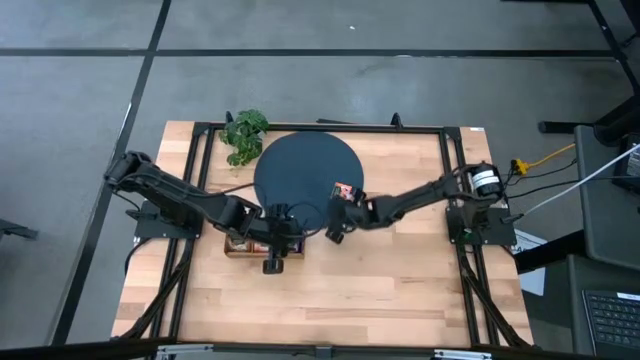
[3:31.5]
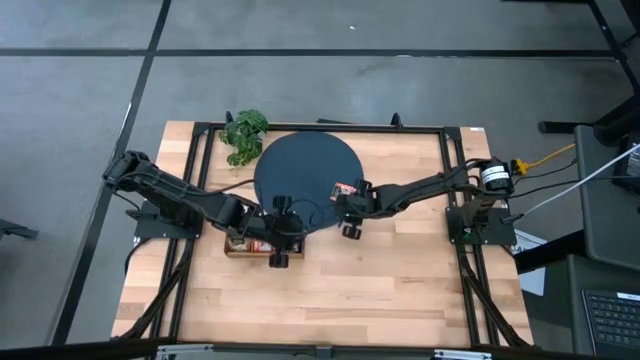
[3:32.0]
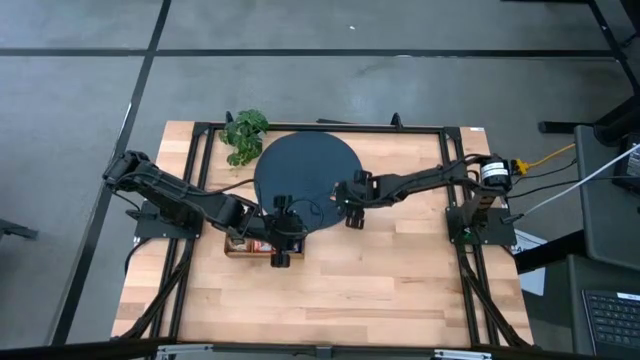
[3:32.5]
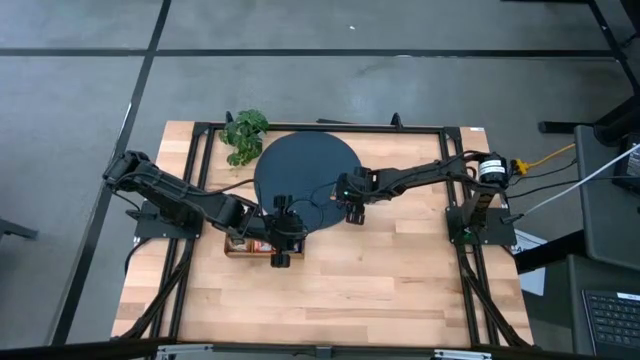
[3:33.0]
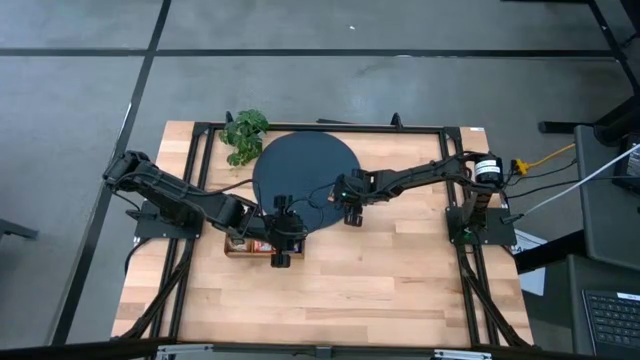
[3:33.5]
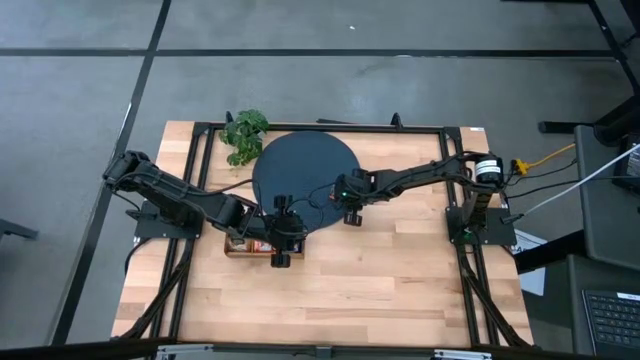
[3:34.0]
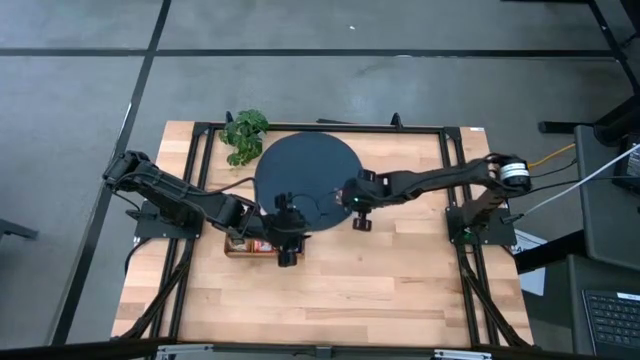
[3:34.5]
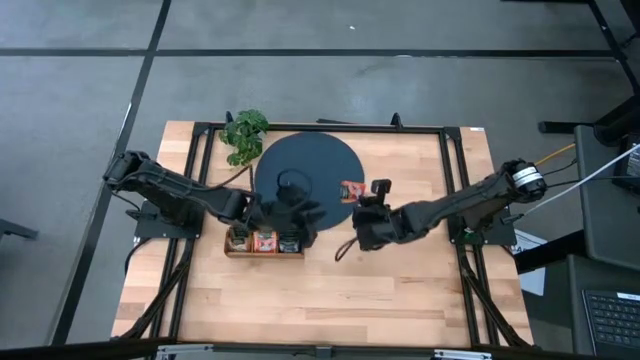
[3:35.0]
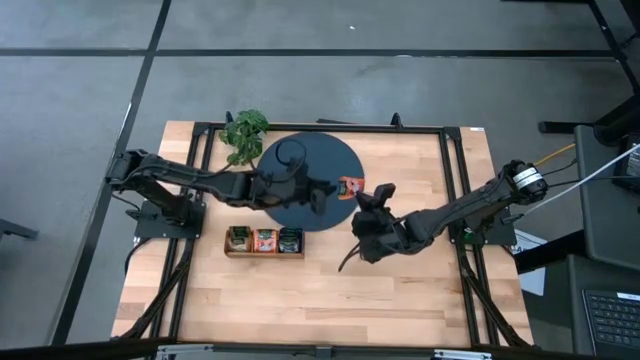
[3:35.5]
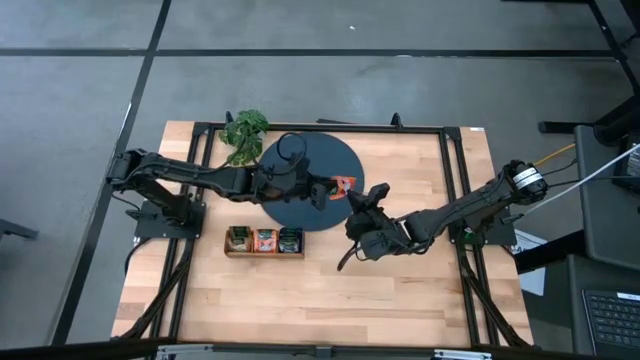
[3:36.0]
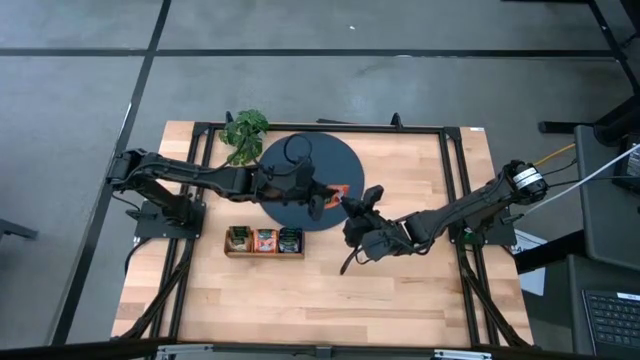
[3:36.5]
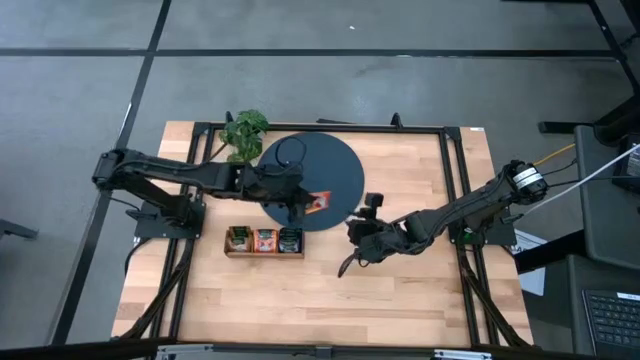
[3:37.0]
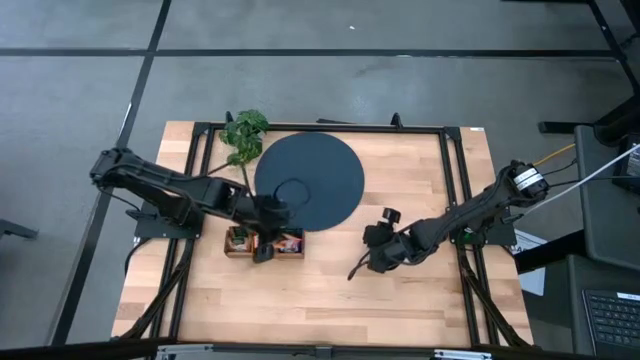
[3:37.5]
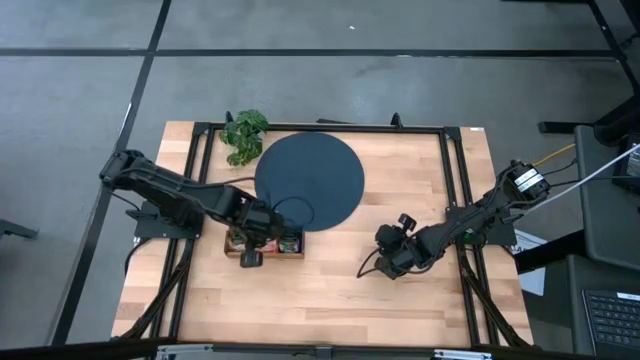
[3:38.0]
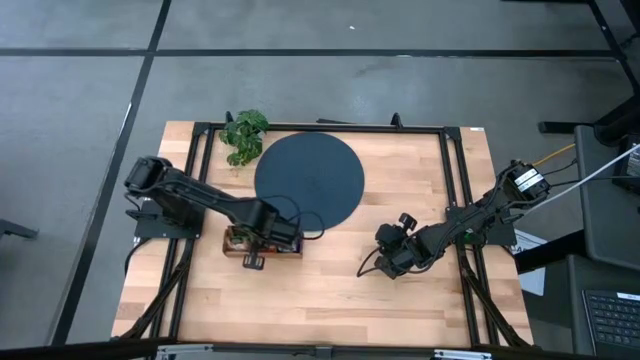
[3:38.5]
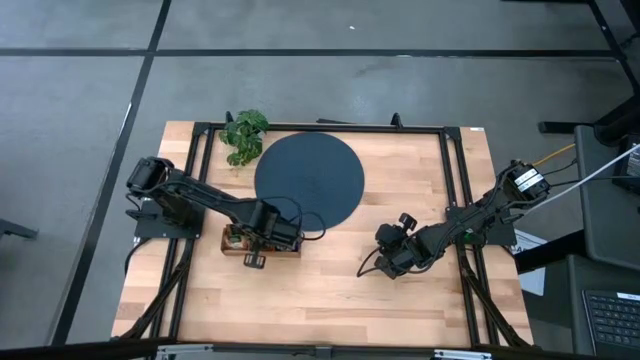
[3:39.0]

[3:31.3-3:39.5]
Task: Pick & Place Tea
Put the orange tea bag into the middle section of the wooden organizer

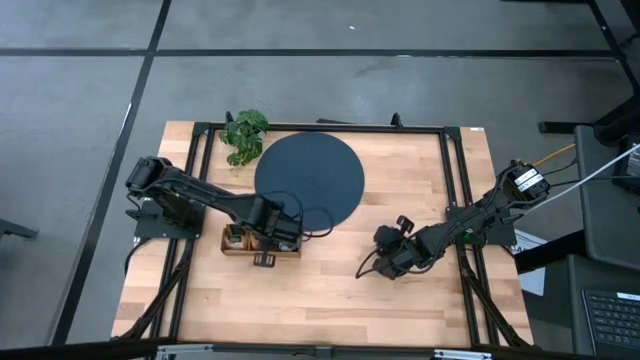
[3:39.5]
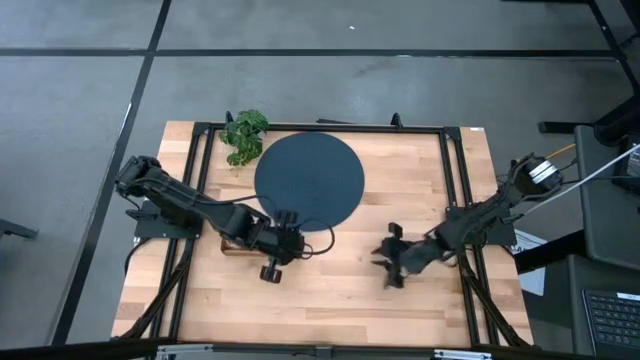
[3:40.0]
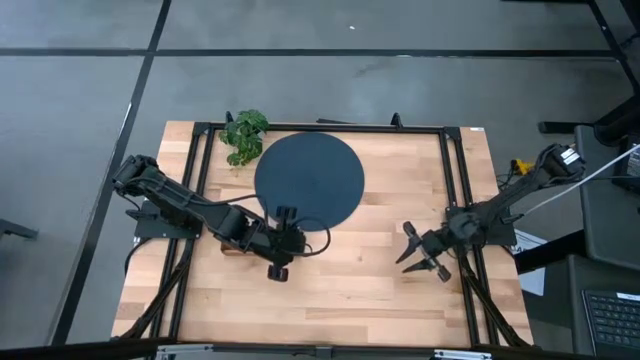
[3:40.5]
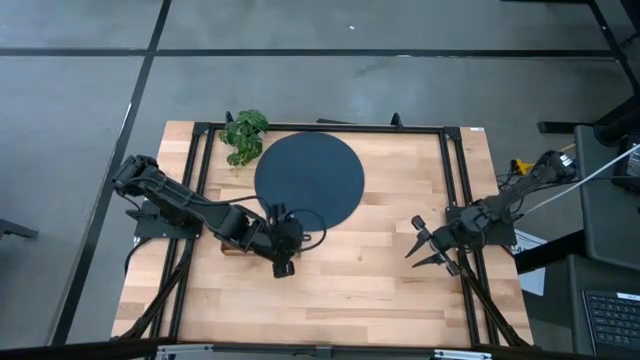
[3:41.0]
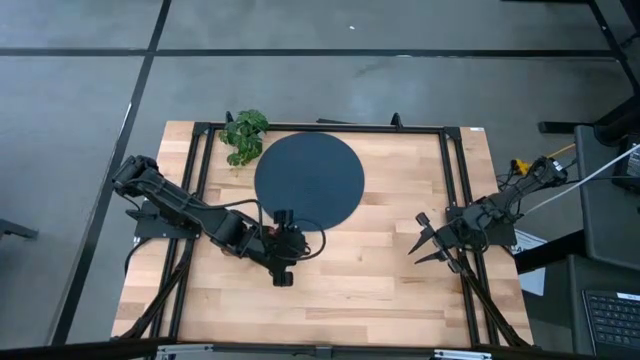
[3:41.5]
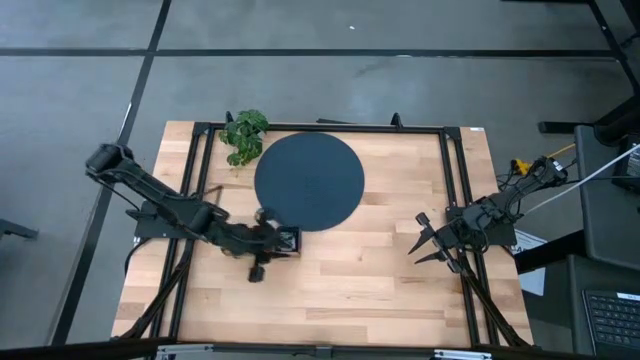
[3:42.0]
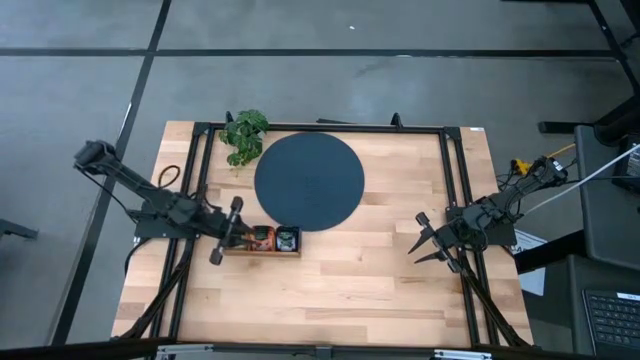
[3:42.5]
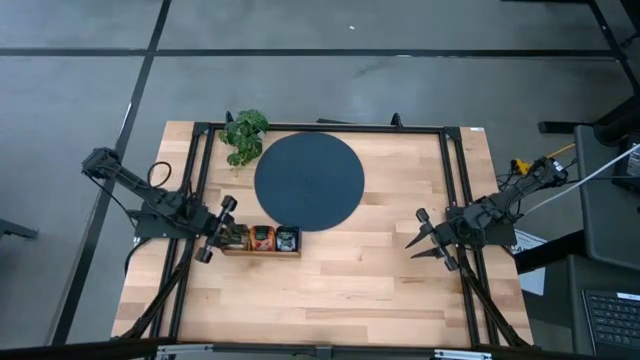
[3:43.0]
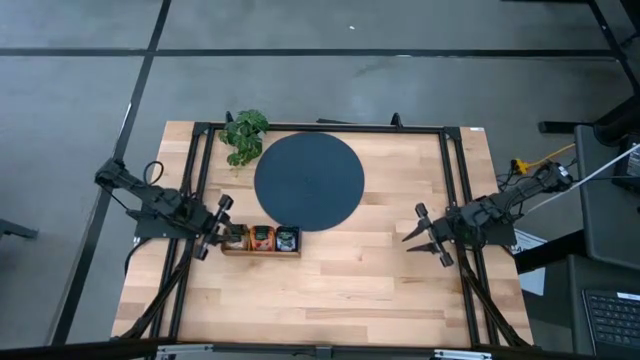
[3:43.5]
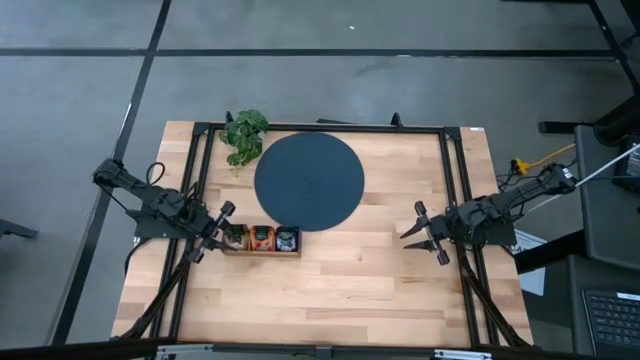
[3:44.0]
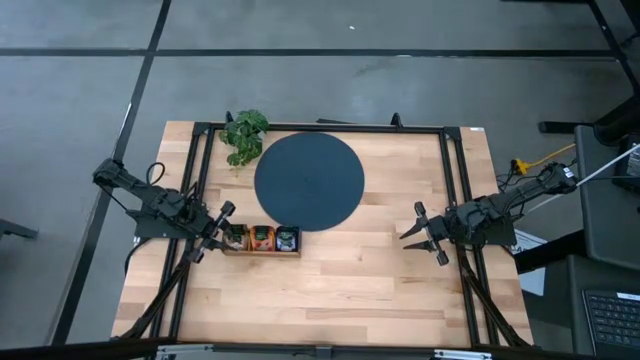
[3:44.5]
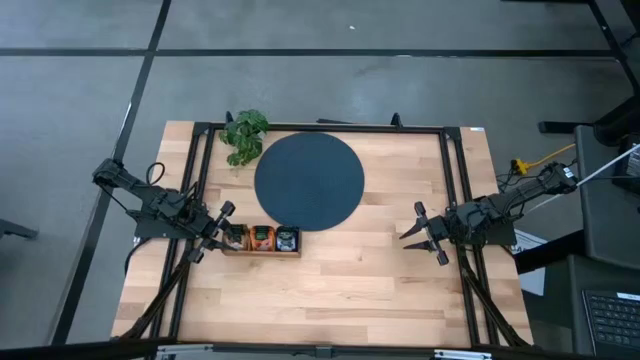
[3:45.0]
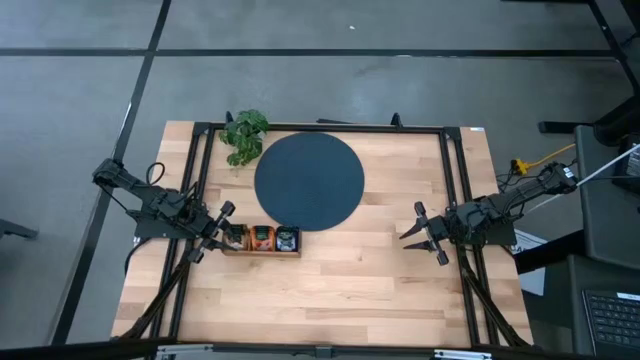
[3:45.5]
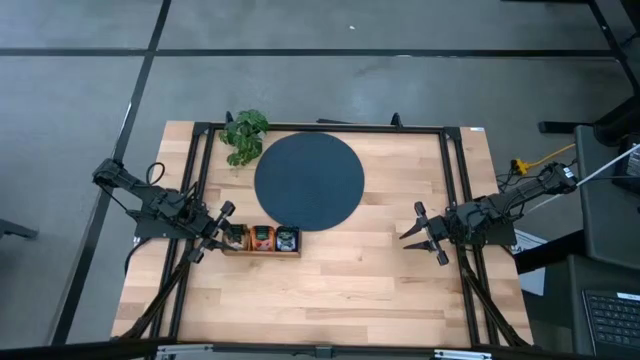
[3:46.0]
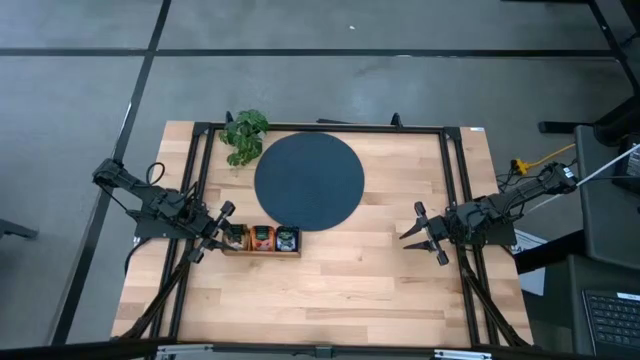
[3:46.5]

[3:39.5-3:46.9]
Return to Home Position

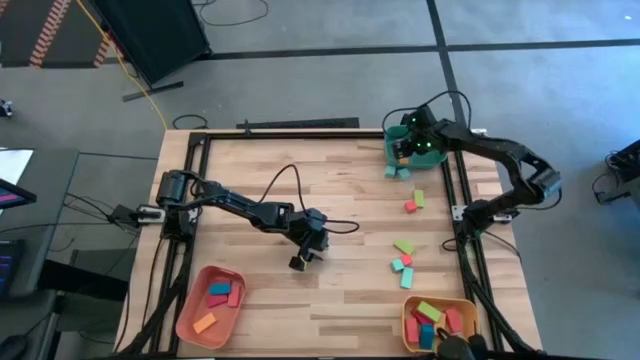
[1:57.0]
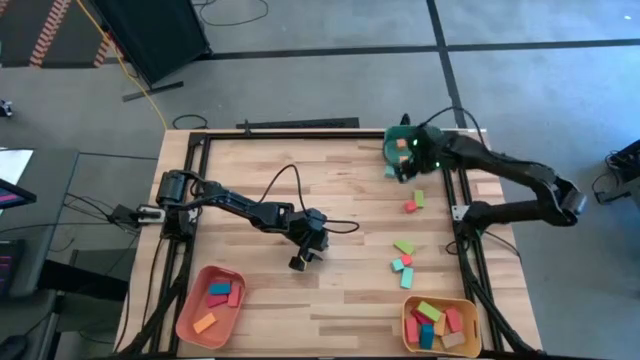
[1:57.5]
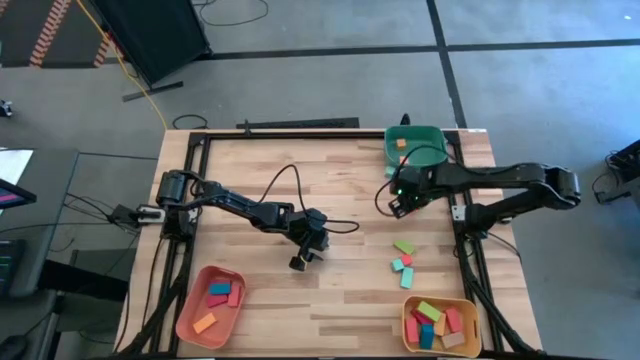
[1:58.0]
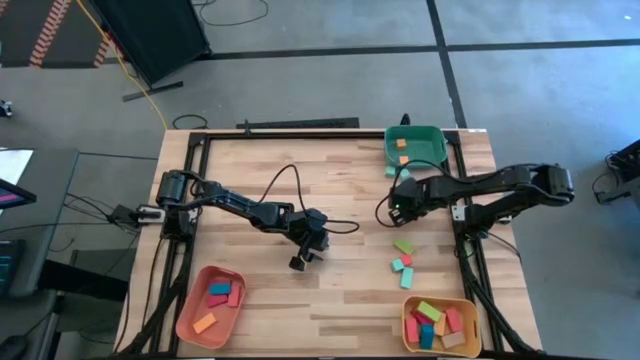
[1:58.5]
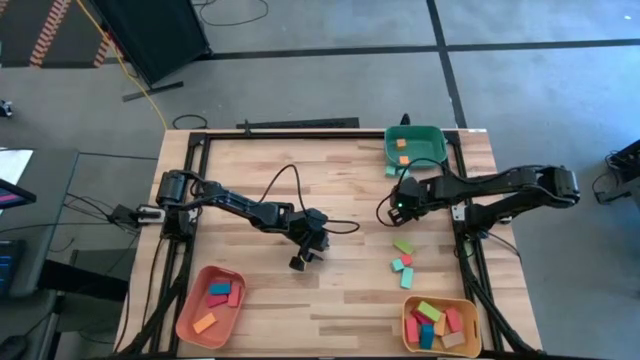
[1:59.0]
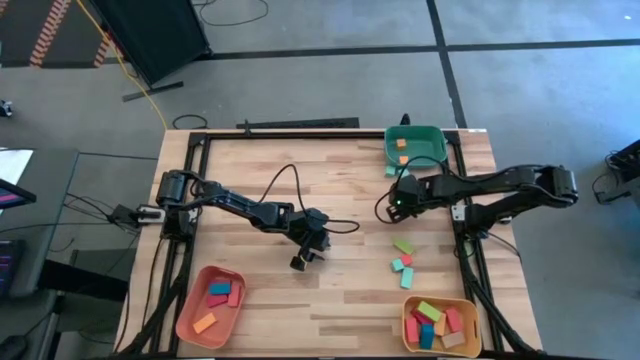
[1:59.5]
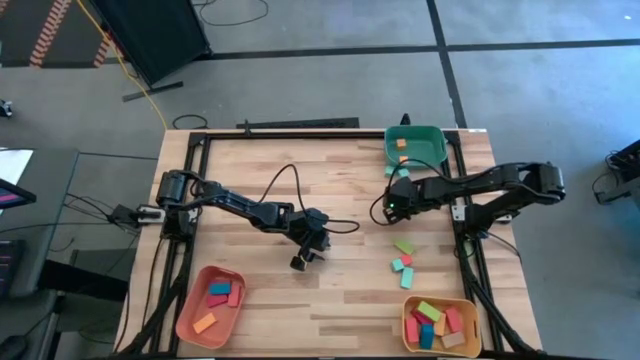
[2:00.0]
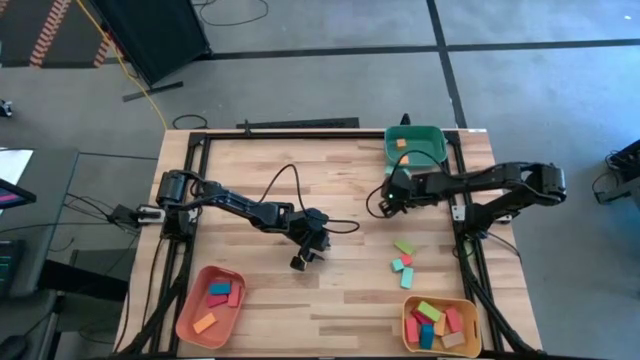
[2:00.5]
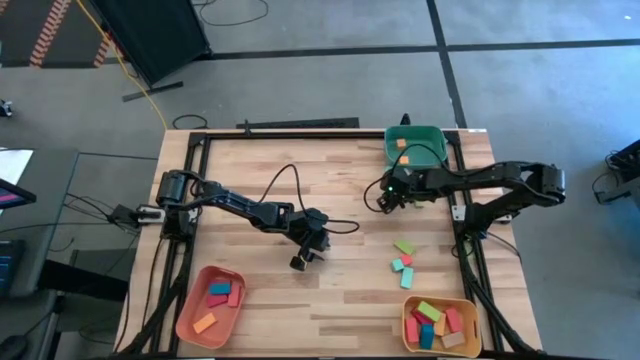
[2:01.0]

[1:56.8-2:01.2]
Task: Sort blocks by size
Put the small orange square block into the blue bin

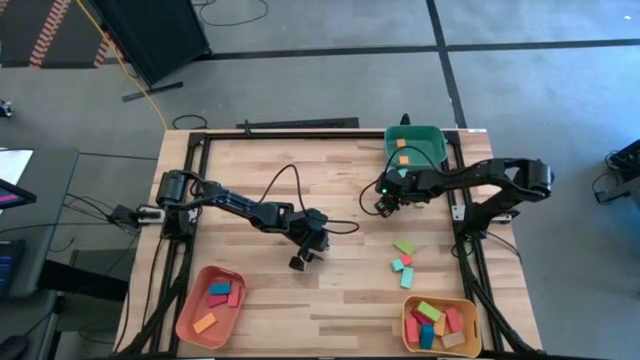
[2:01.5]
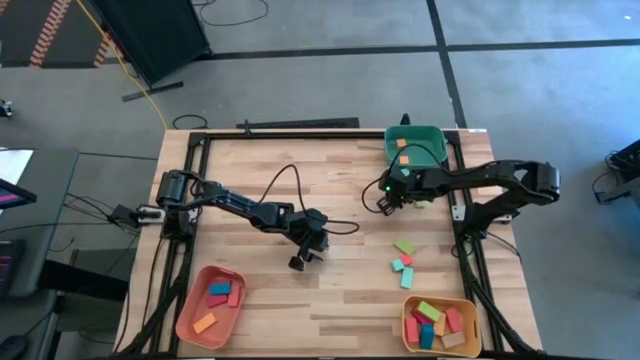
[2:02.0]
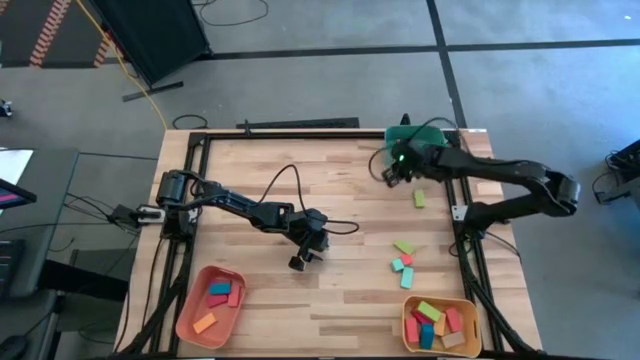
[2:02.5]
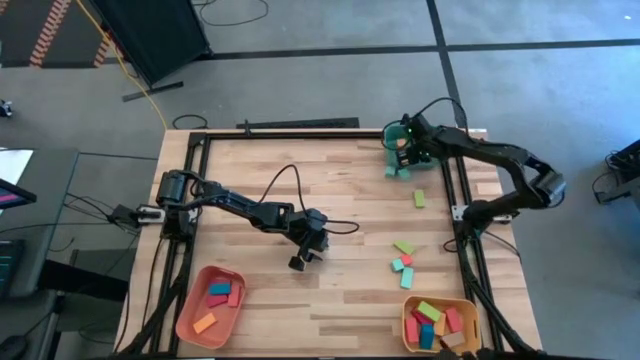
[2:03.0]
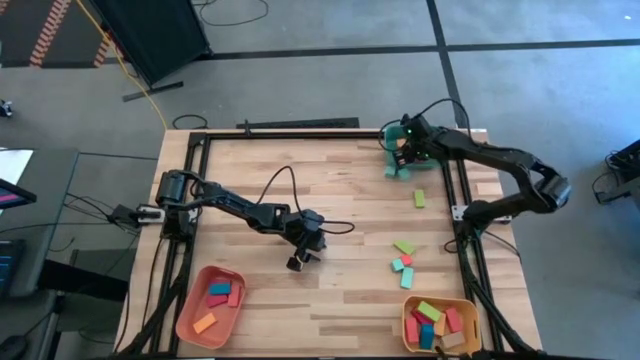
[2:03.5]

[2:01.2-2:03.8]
Put the small orange square block into the blue bin
